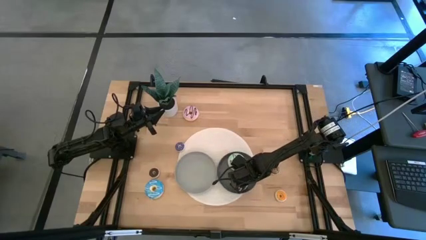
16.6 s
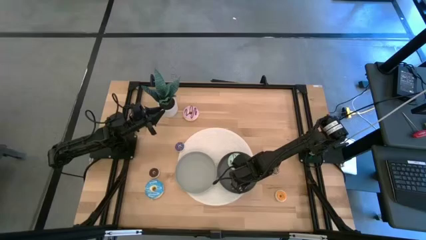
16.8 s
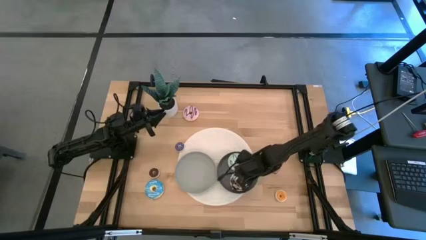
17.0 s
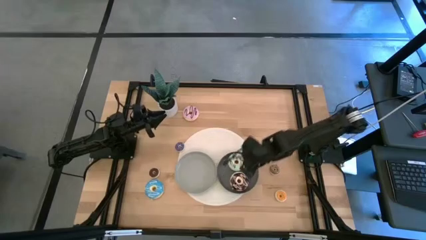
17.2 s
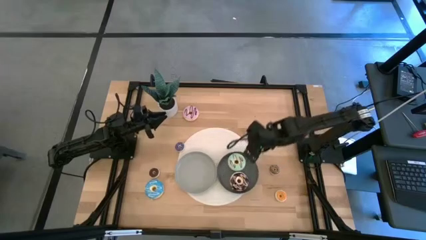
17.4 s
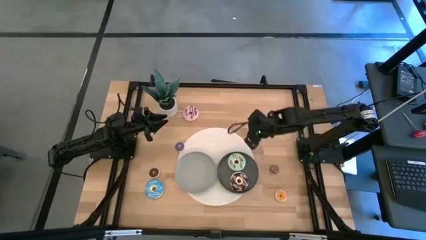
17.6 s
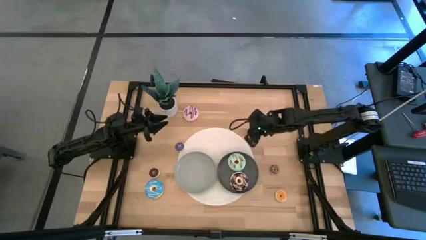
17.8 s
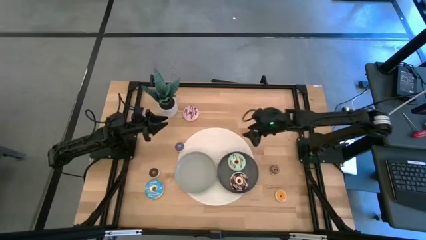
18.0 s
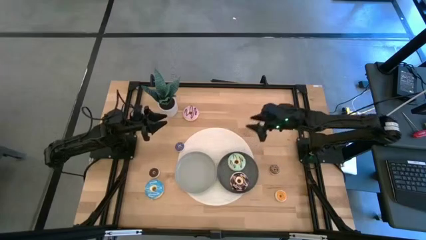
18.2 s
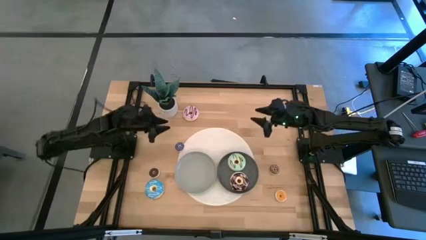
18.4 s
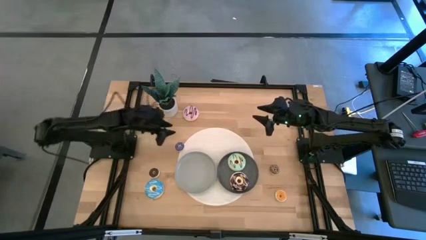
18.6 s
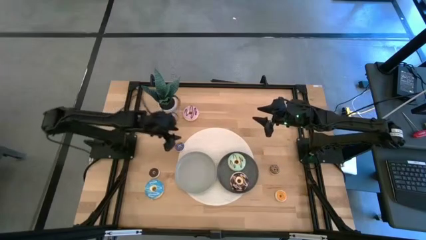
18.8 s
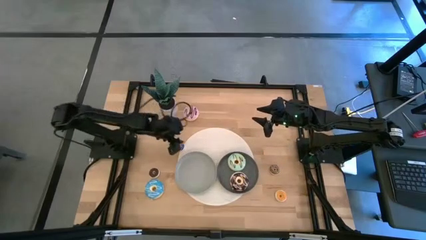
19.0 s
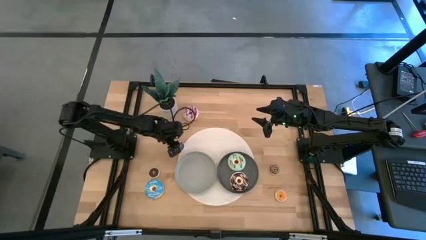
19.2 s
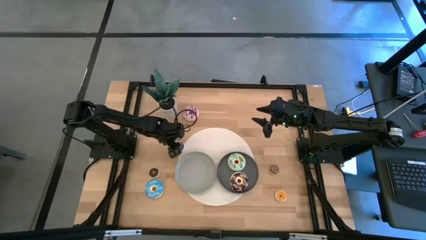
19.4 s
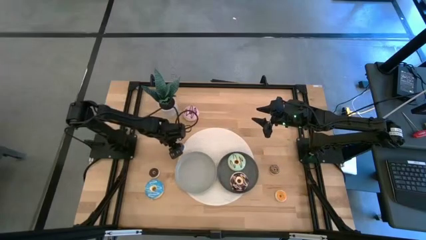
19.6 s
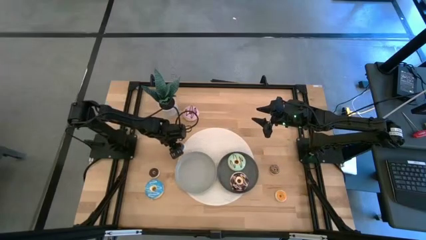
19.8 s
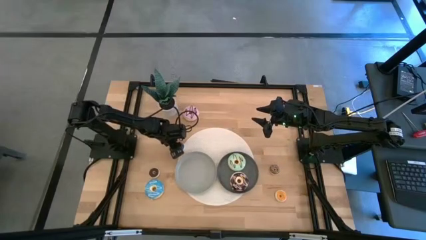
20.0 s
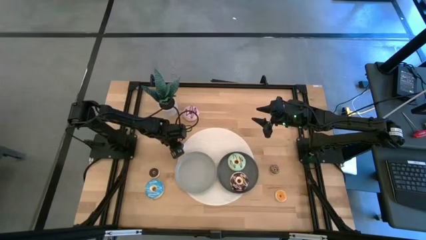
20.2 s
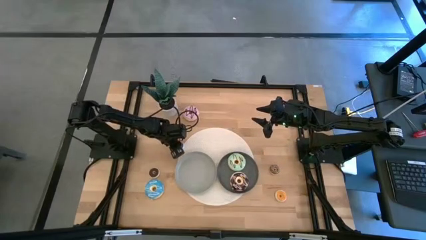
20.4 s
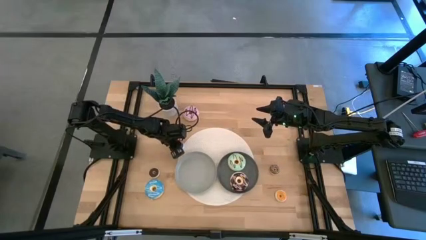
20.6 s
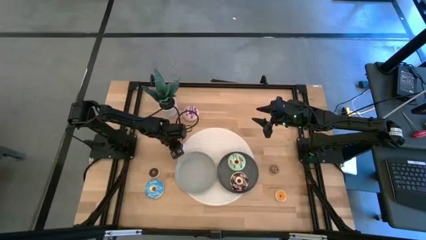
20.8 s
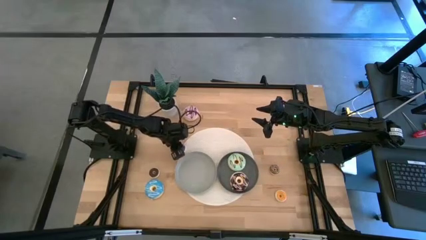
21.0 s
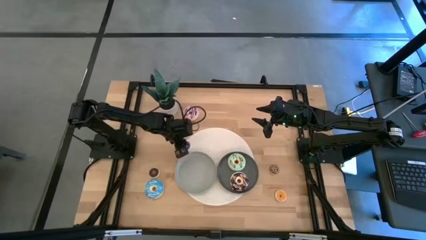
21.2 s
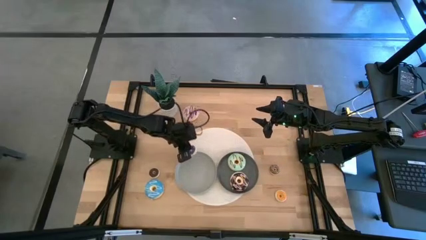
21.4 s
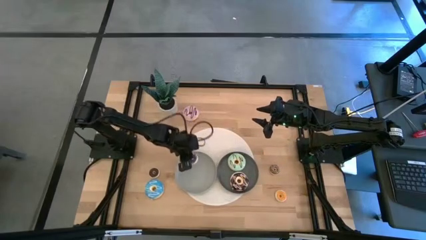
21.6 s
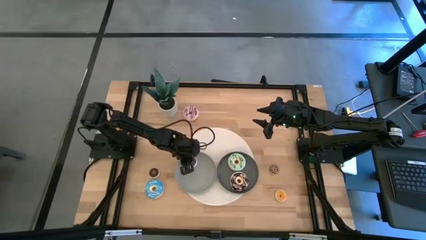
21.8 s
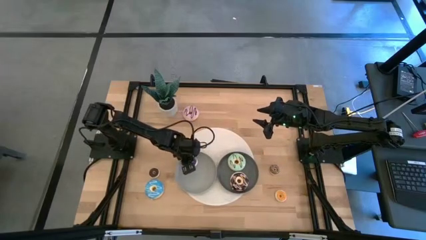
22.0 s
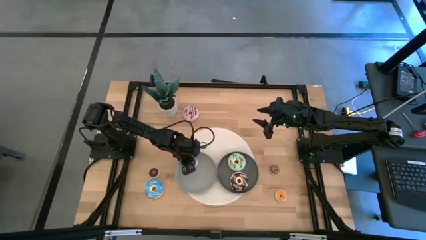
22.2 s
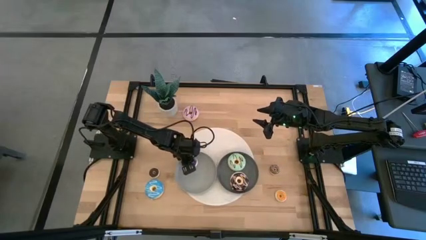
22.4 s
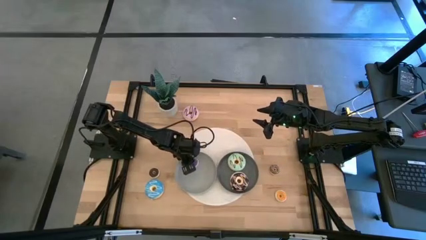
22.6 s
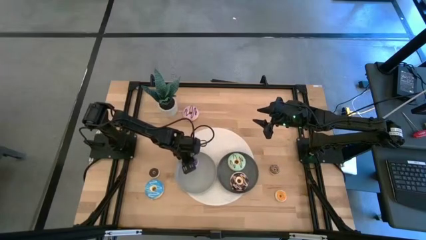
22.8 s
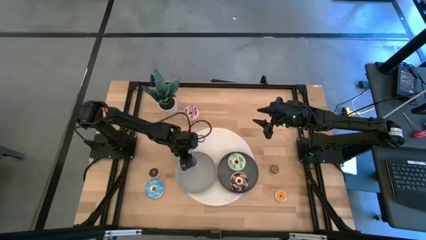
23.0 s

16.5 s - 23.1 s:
Task: Pick & Place donuts
Put the small blue donut on the light gray plate

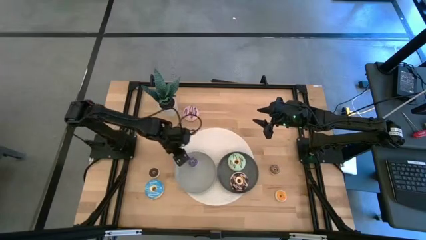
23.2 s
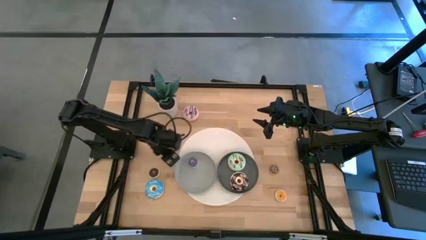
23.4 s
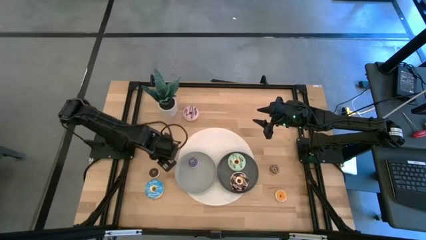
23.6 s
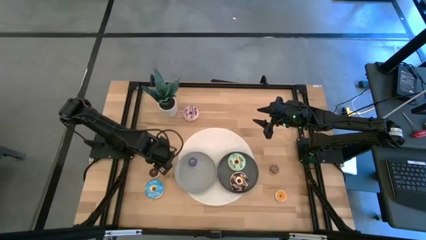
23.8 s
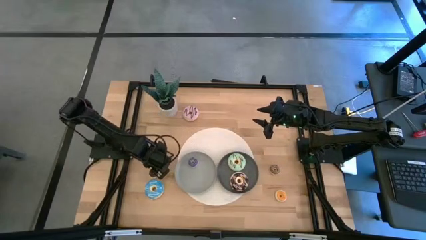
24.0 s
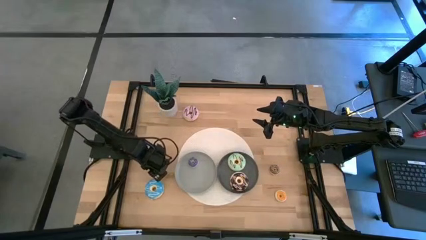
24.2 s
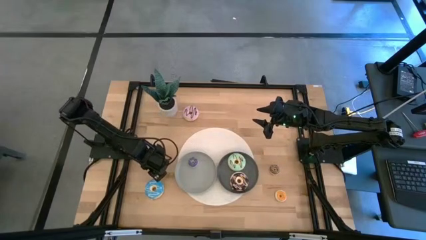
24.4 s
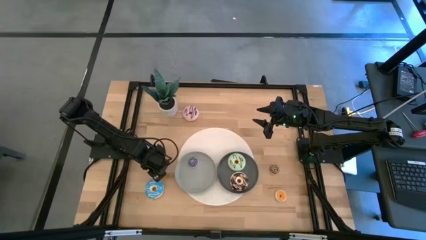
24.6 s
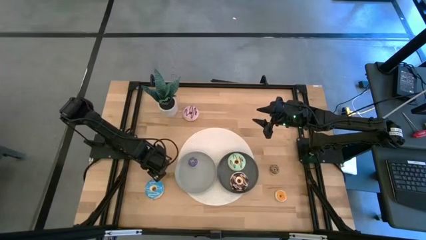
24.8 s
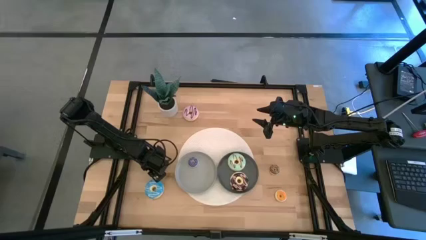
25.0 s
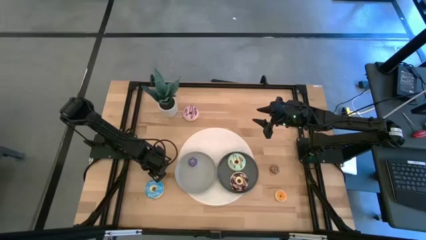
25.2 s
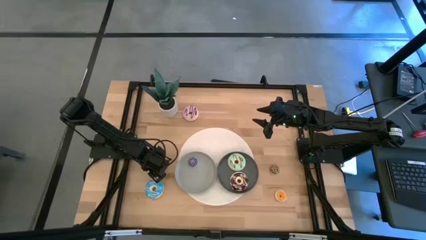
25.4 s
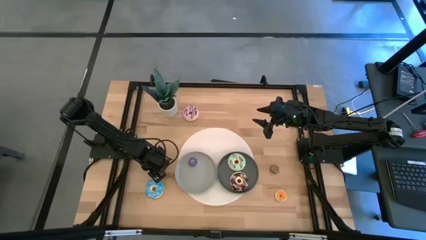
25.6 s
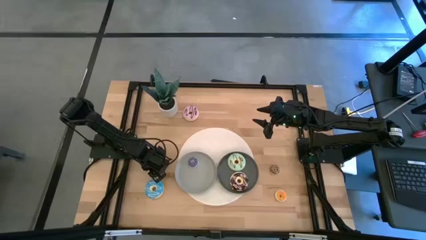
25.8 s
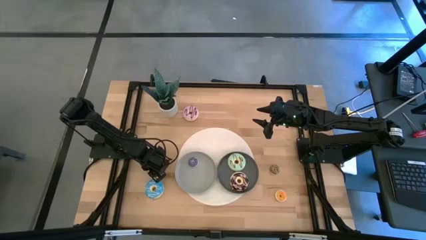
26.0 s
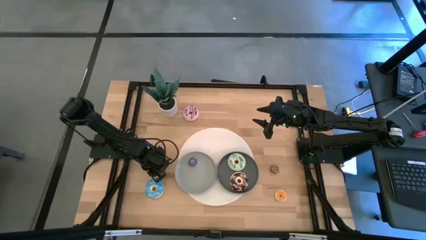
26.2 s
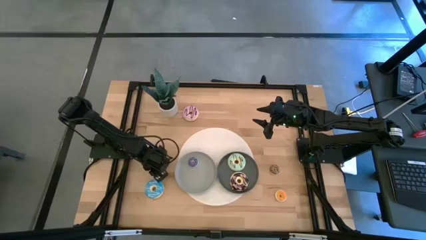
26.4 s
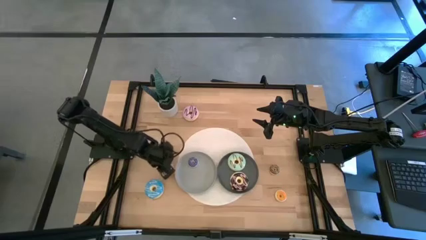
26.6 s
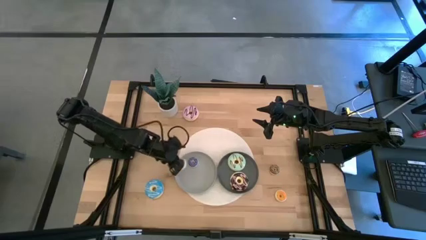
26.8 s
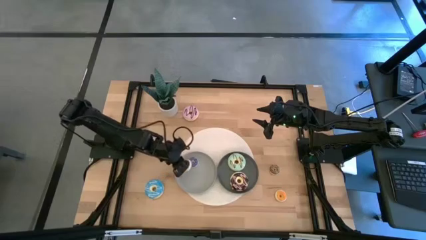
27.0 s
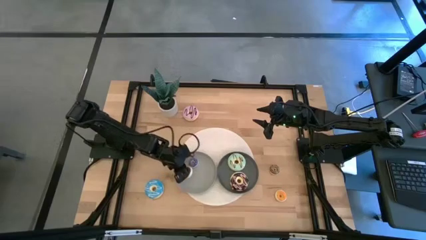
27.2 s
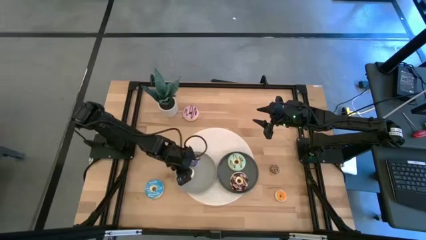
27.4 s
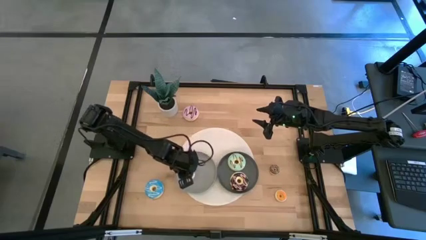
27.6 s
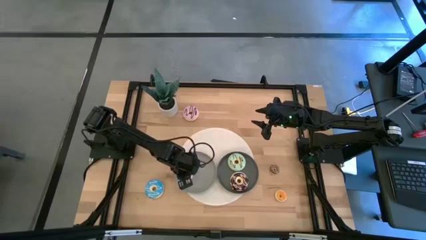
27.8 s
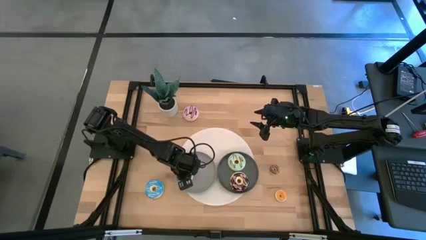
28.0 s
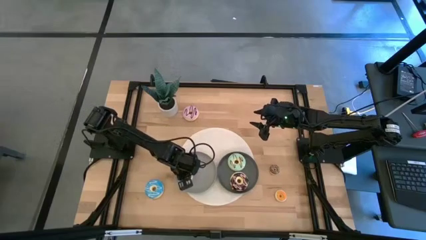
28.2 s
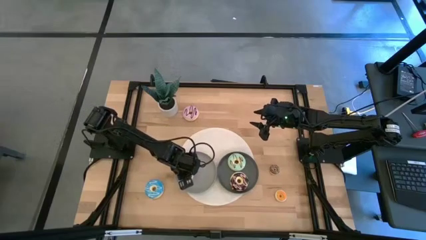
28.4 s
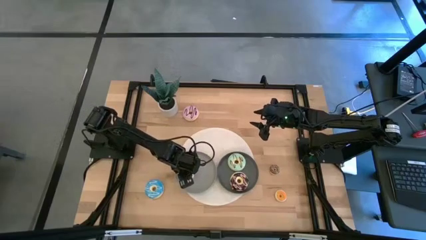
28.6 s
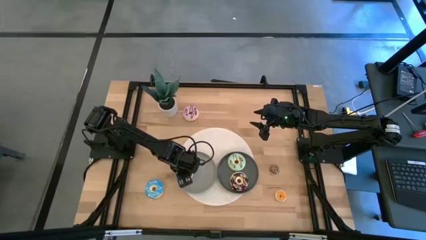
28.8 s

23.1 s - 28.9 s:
Put the small brown donut on the light gray plate

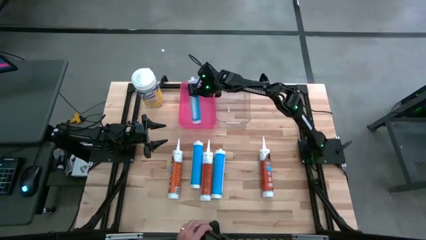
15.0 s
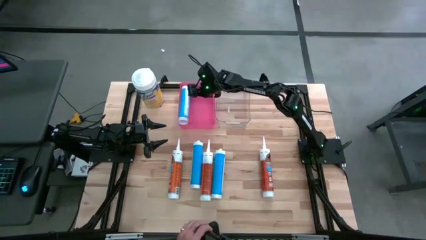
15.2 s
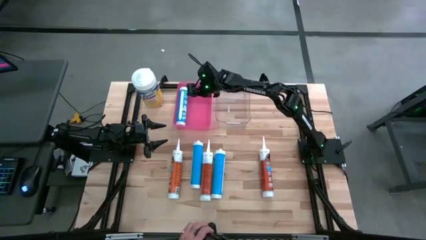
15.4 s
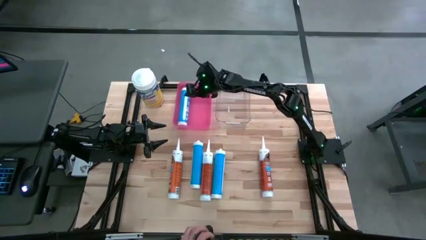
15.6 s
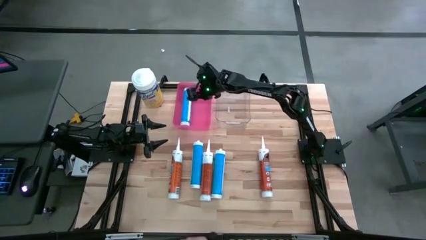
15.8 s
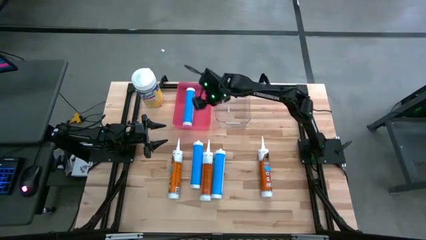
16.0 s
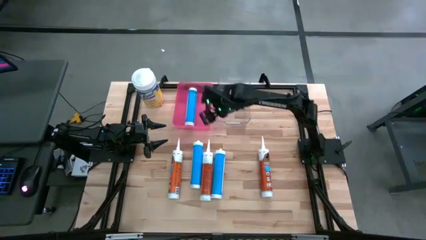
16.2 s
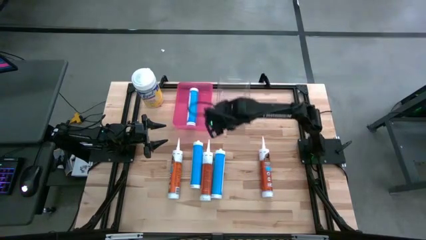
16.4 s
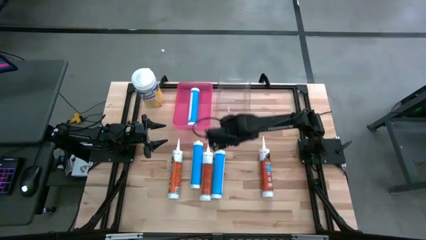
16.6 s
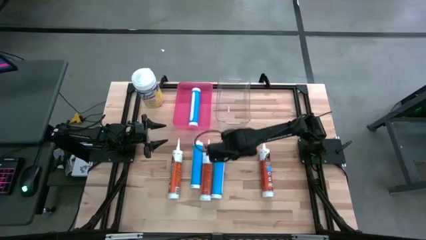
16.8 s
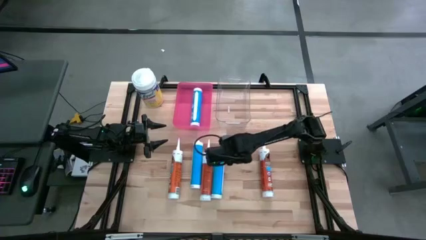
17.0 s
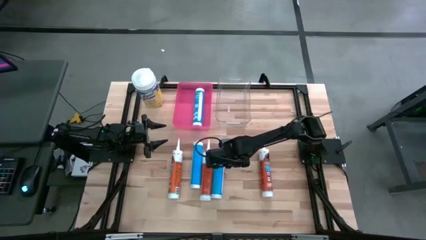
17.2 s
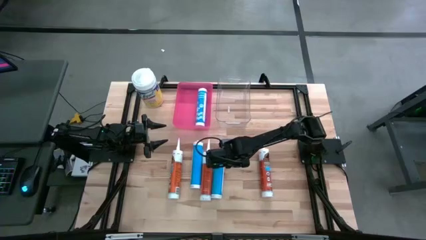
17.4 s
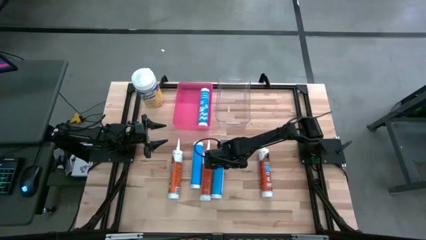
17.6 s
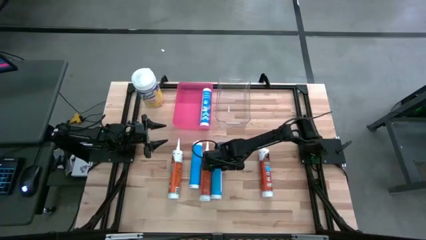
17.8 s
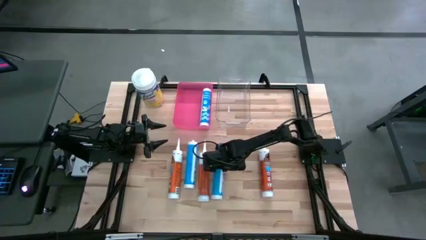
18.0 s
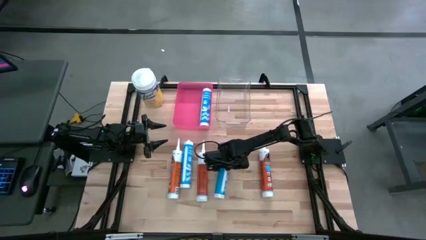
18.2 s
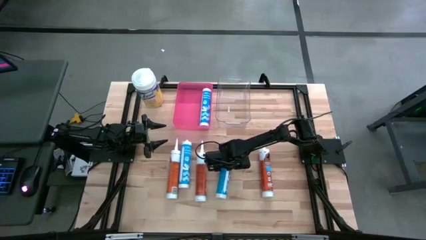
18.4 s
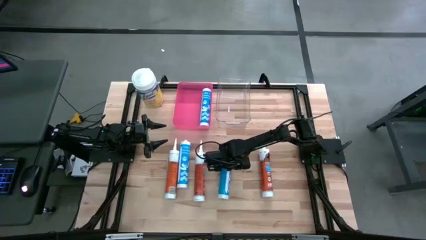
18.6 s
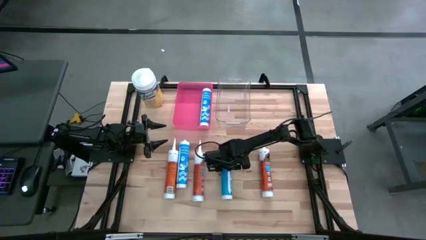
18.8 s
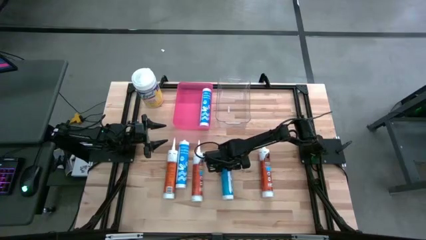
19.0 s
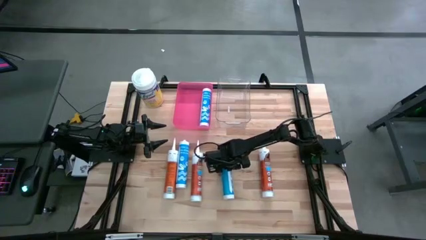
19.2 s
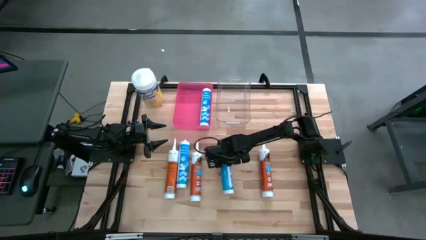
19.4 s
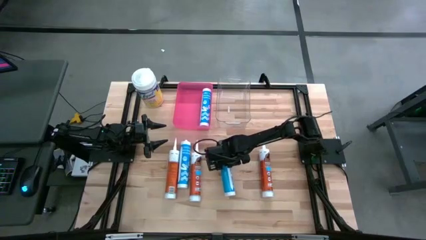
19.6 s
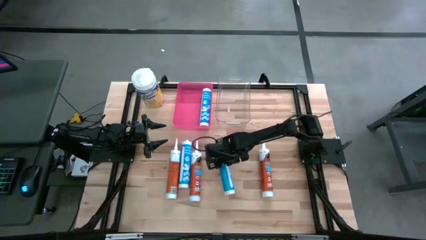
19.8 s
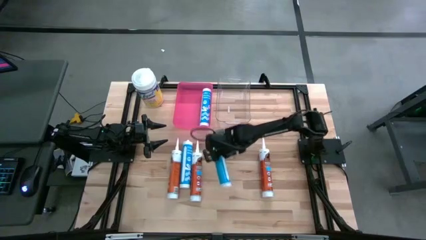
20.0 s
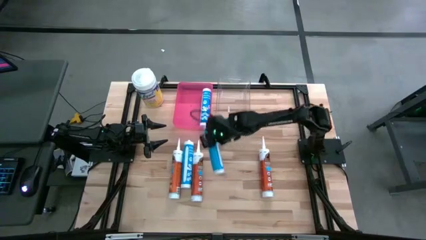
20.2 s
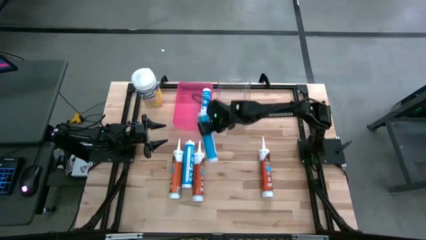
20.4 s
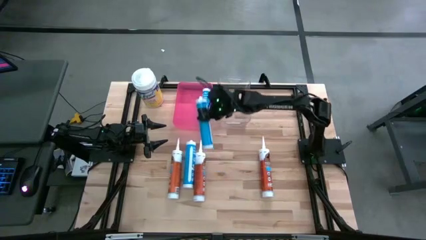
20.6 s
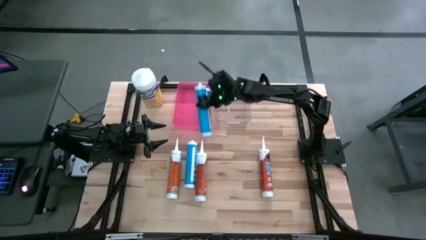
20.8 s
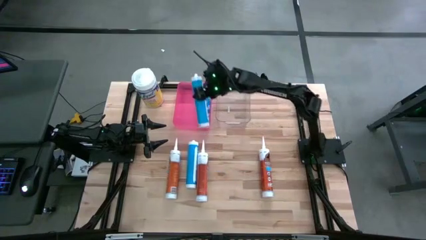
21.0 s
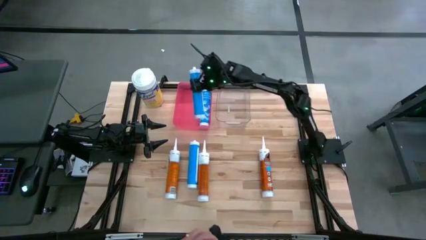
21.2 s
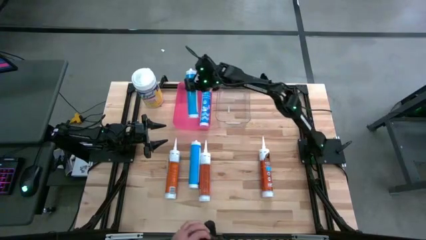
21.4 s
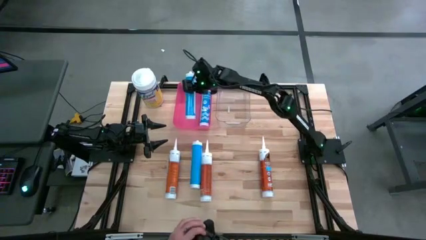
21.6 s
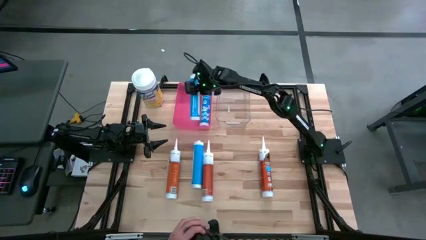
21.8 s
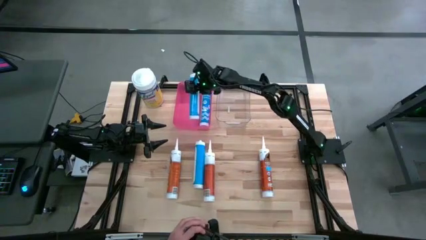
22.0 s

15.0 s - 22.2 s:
Task: Sort silicone sealant tubes
Put the blue silicone sealant into the pink bin
